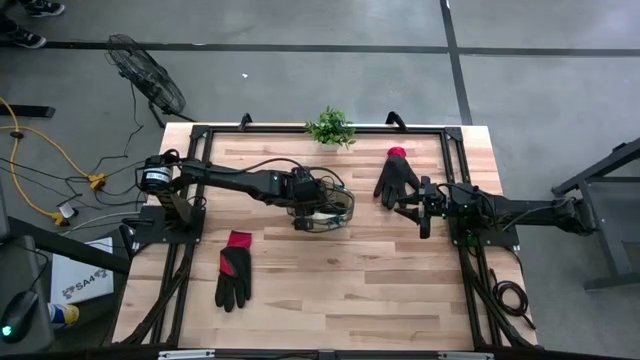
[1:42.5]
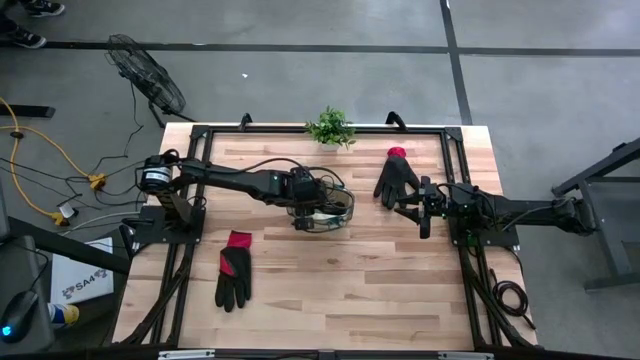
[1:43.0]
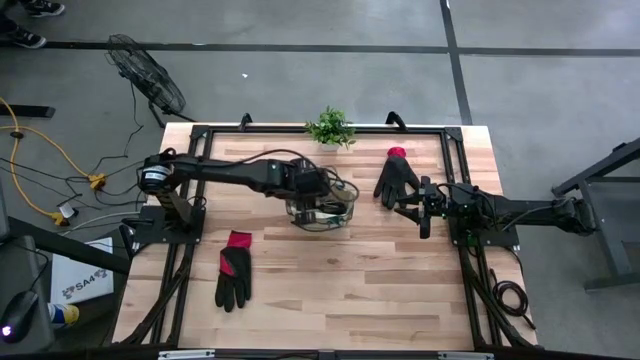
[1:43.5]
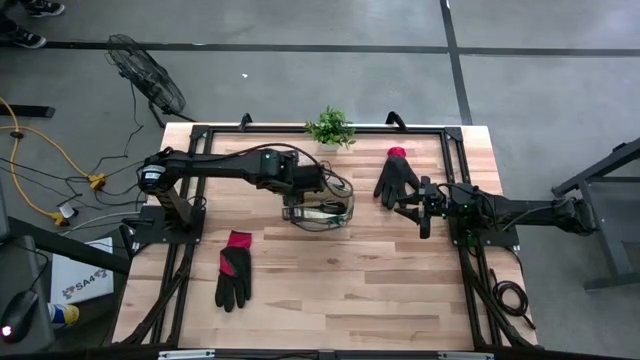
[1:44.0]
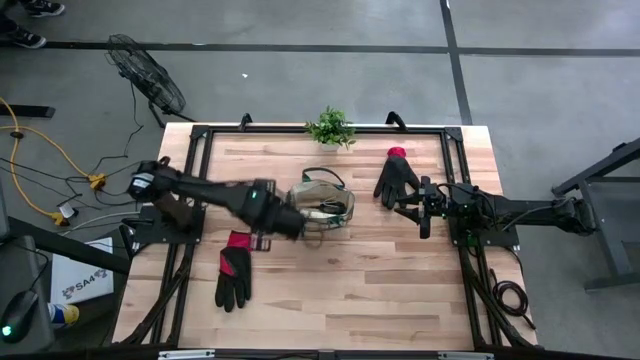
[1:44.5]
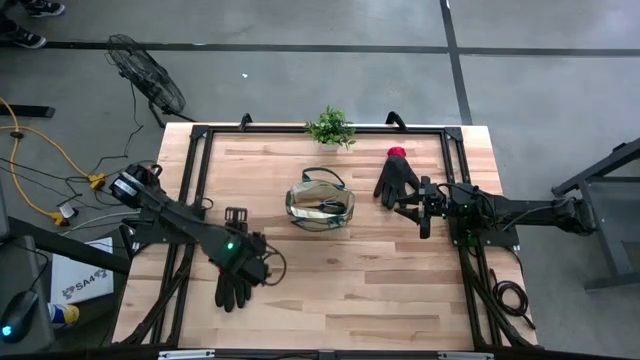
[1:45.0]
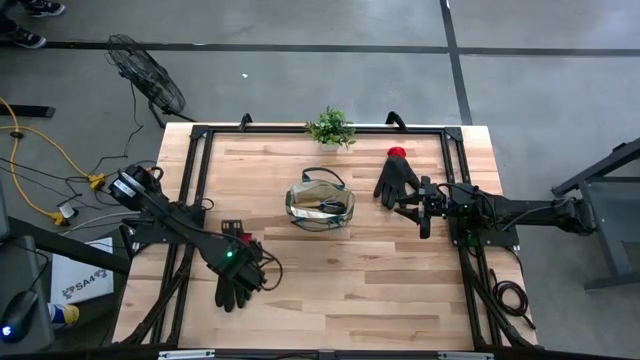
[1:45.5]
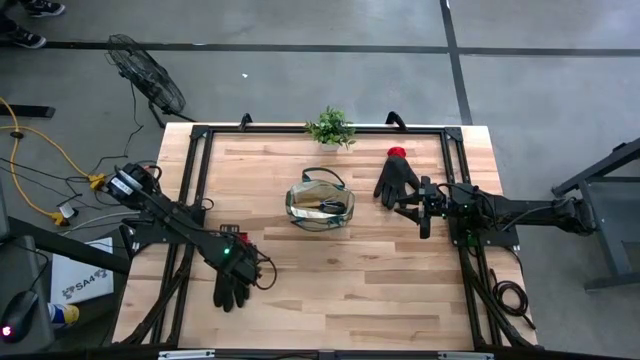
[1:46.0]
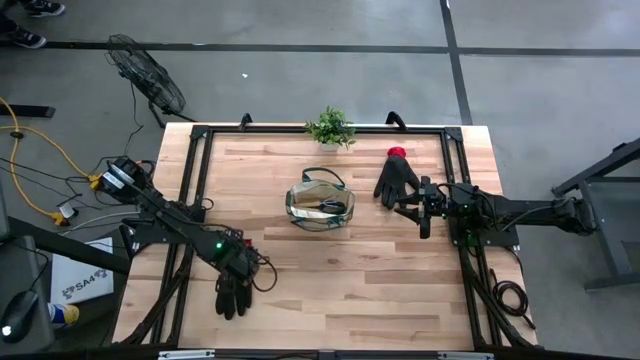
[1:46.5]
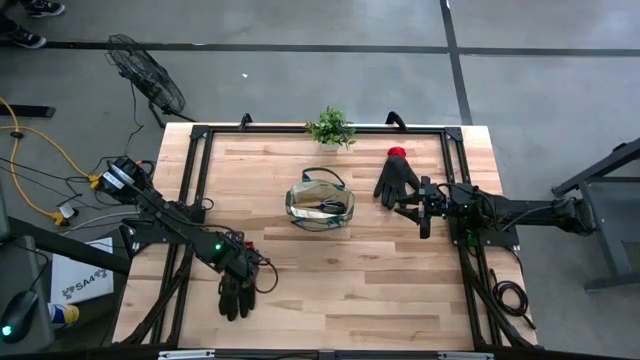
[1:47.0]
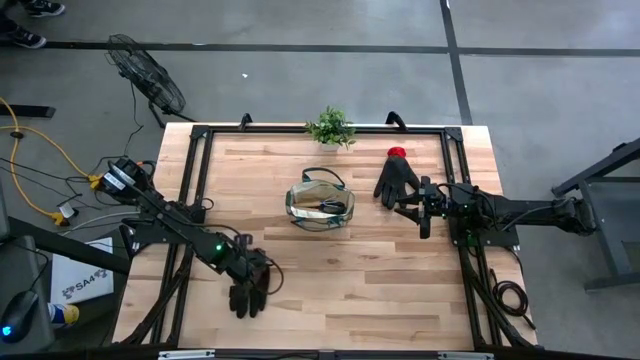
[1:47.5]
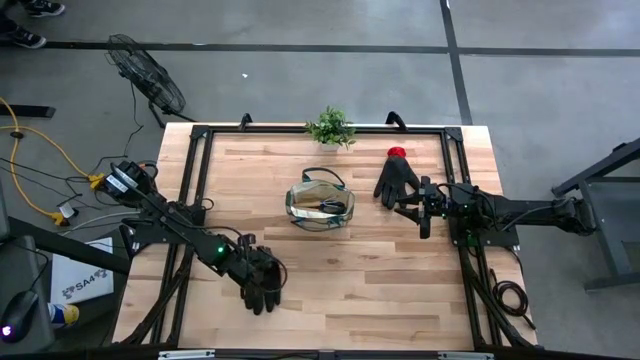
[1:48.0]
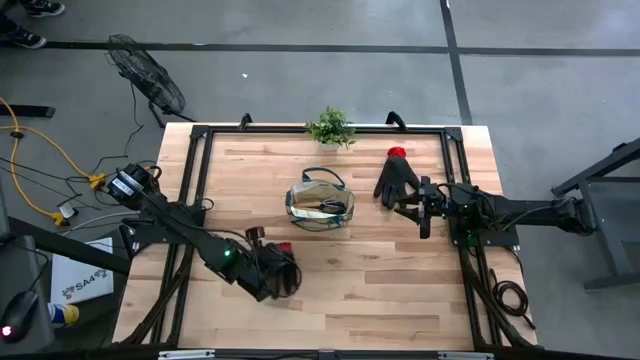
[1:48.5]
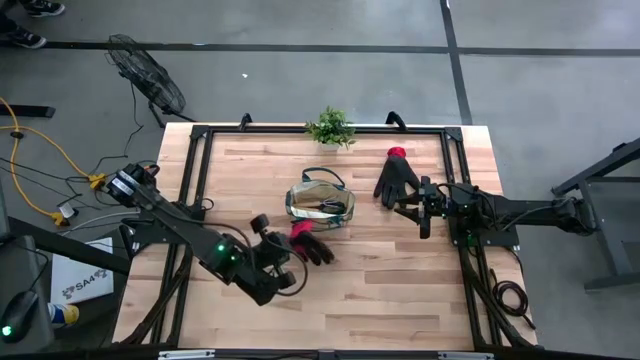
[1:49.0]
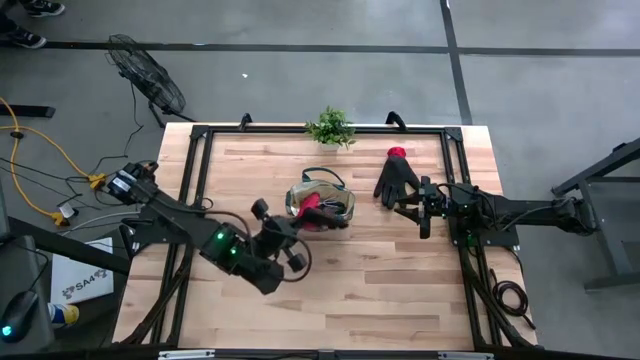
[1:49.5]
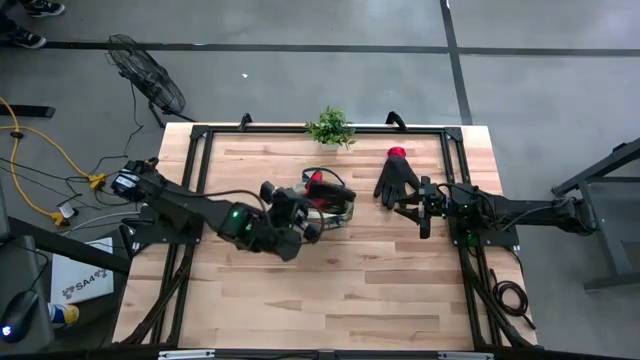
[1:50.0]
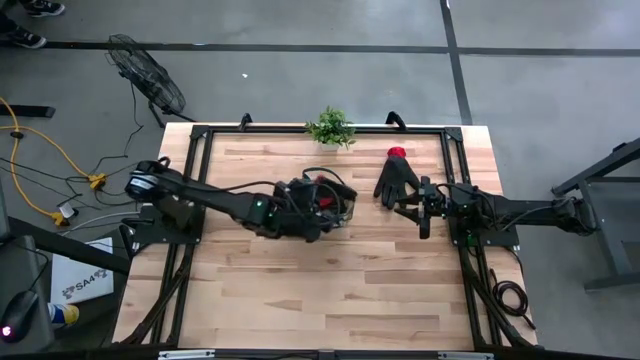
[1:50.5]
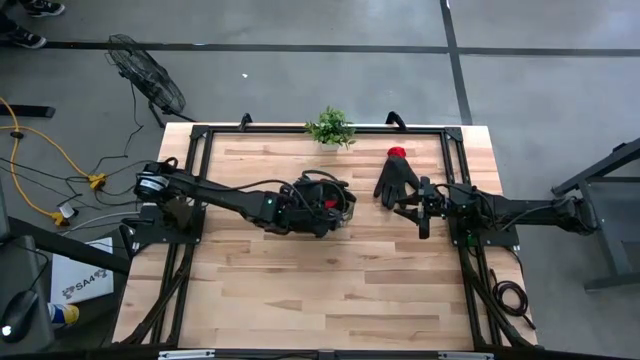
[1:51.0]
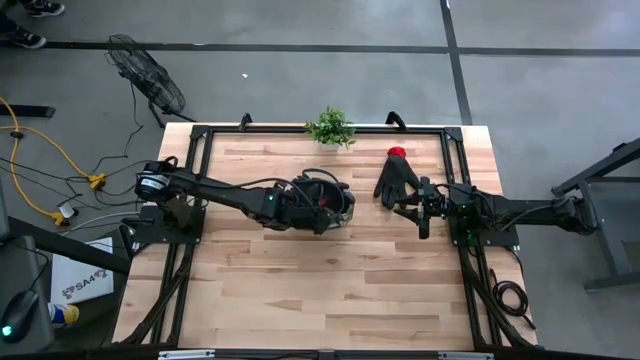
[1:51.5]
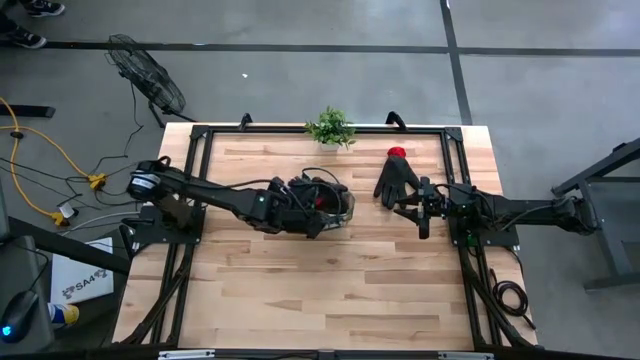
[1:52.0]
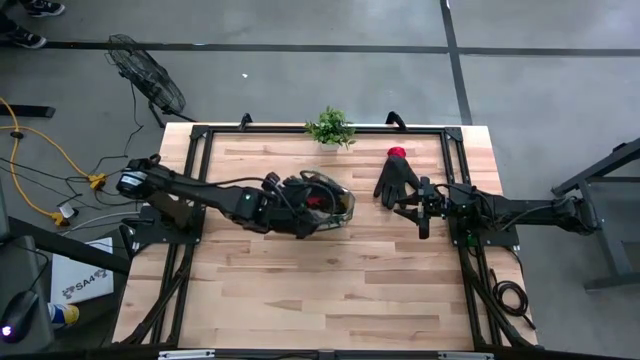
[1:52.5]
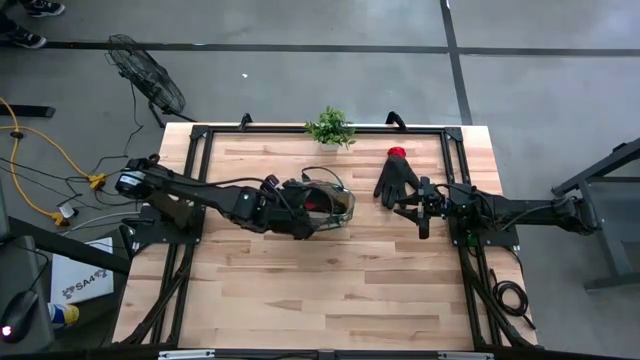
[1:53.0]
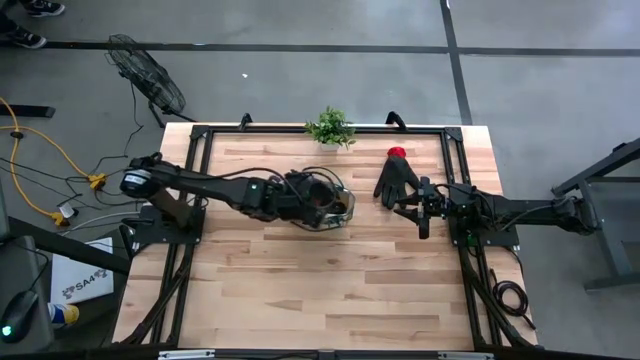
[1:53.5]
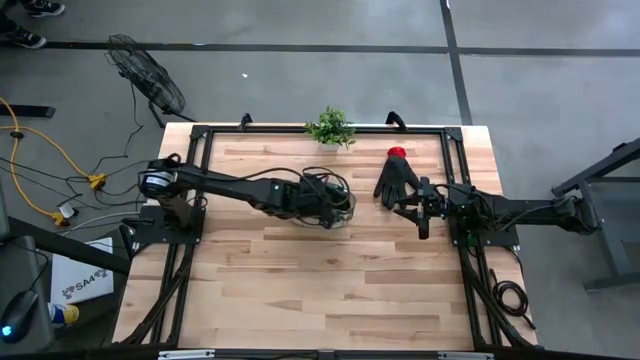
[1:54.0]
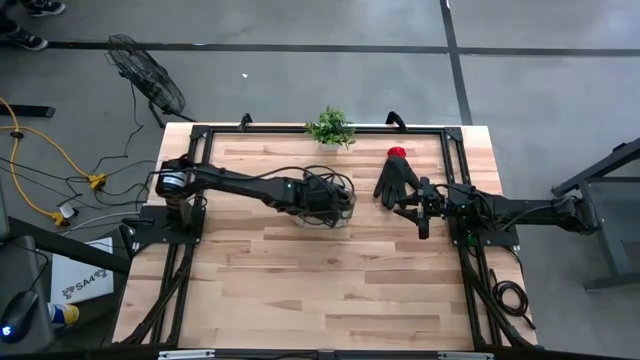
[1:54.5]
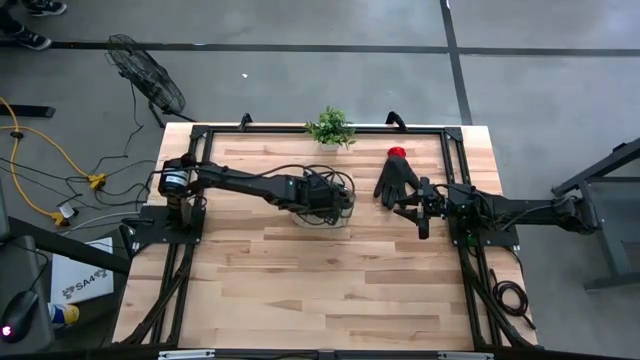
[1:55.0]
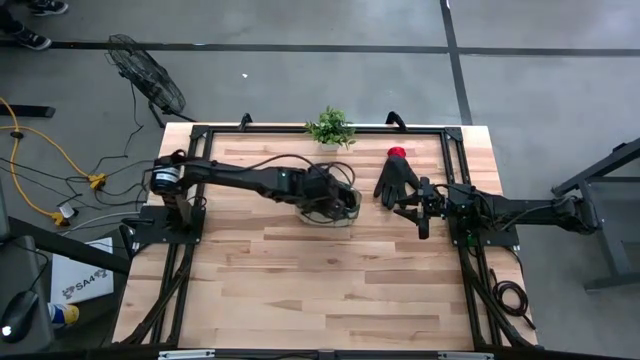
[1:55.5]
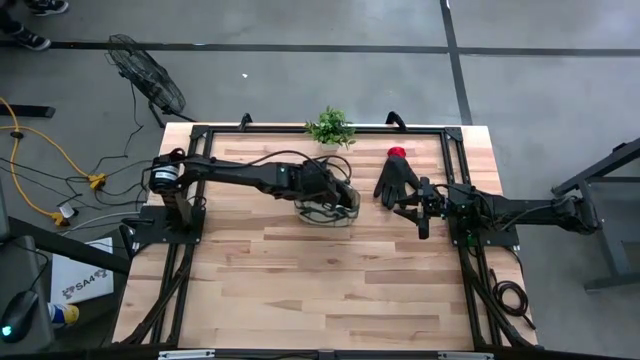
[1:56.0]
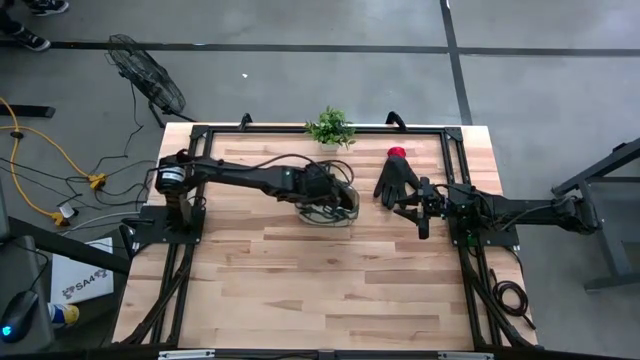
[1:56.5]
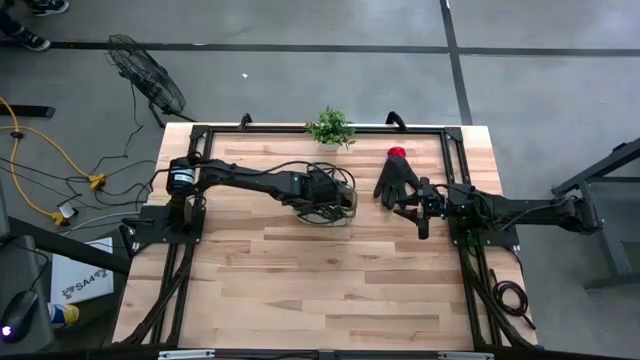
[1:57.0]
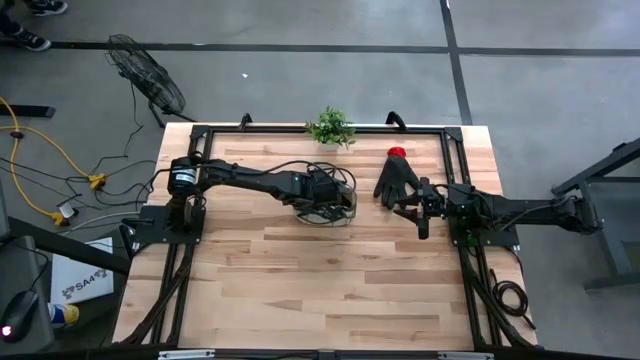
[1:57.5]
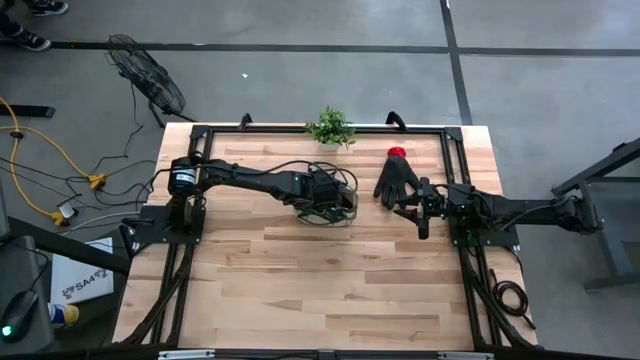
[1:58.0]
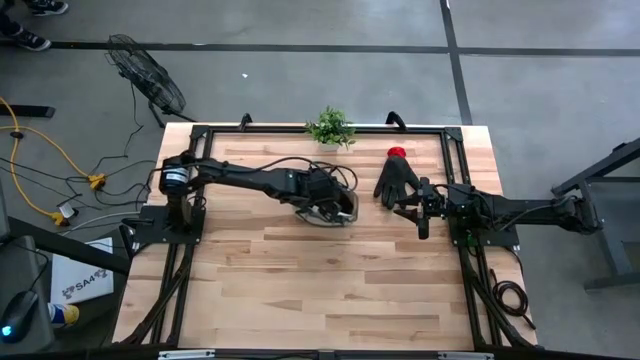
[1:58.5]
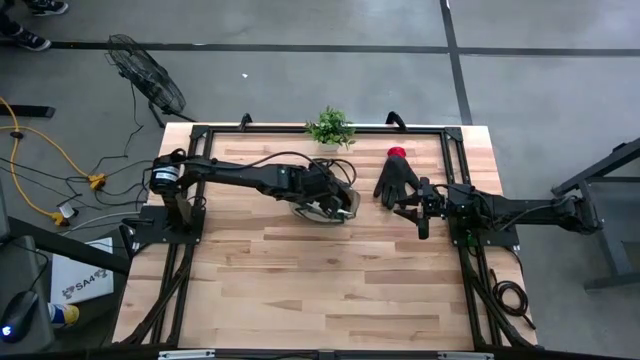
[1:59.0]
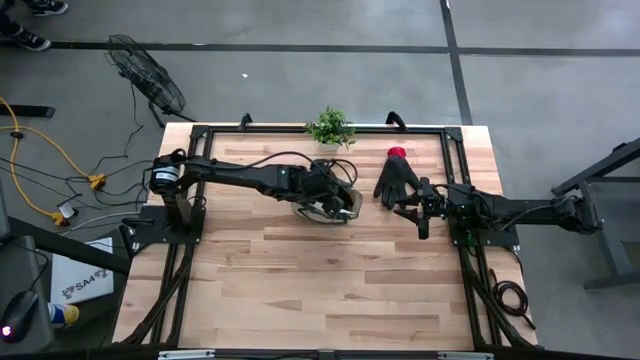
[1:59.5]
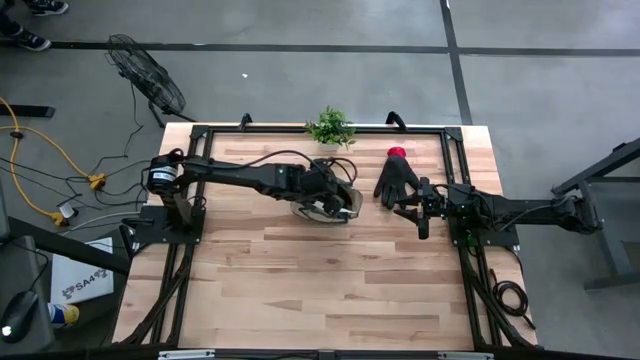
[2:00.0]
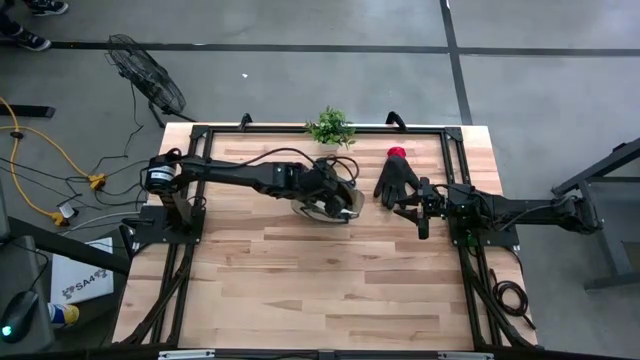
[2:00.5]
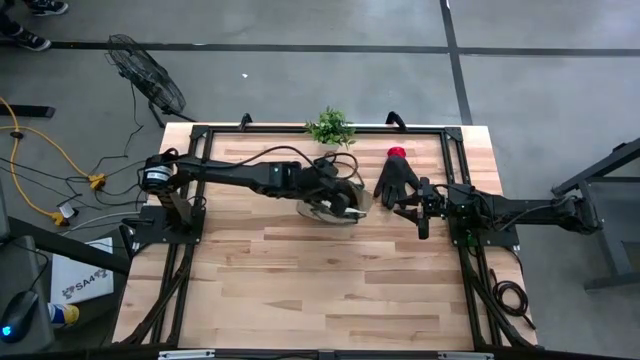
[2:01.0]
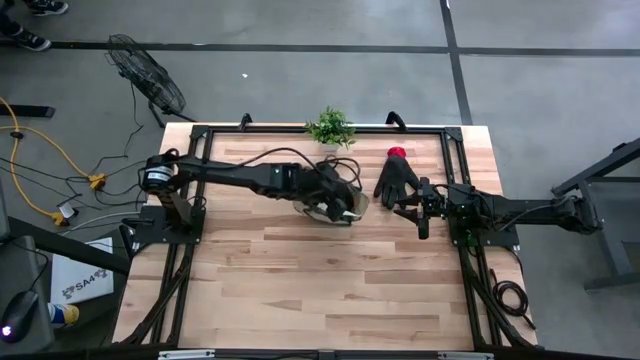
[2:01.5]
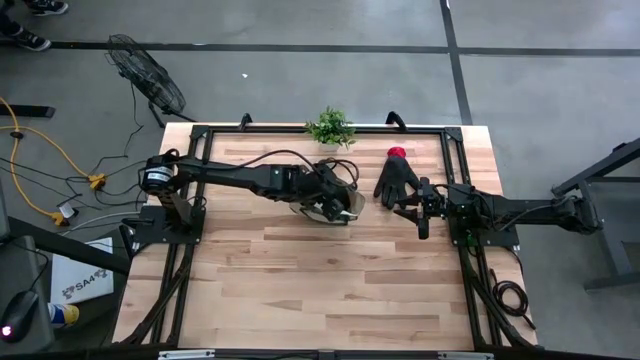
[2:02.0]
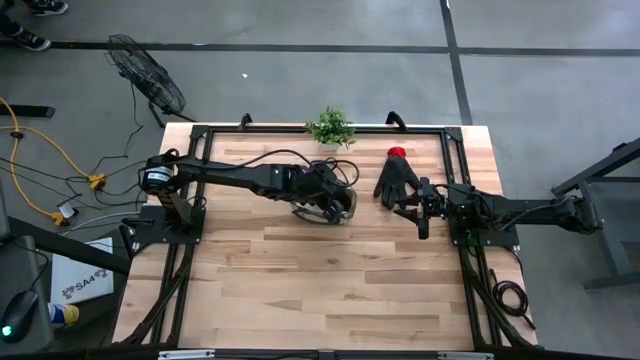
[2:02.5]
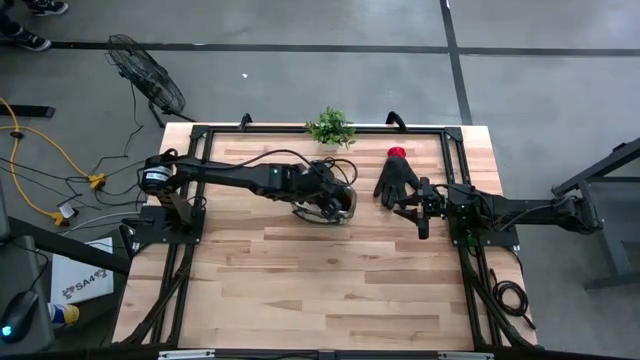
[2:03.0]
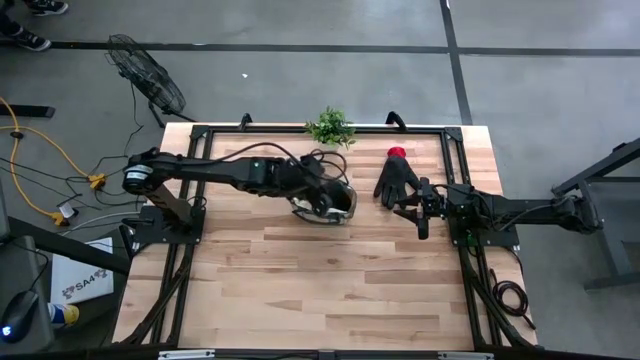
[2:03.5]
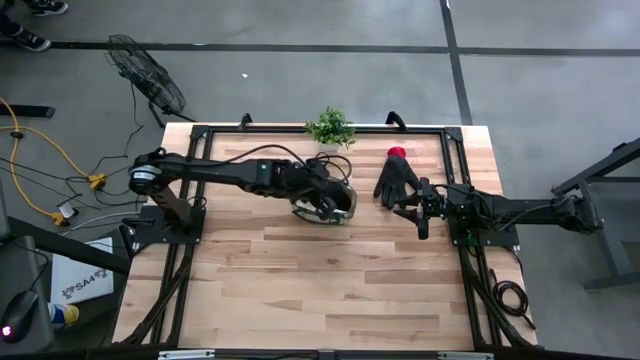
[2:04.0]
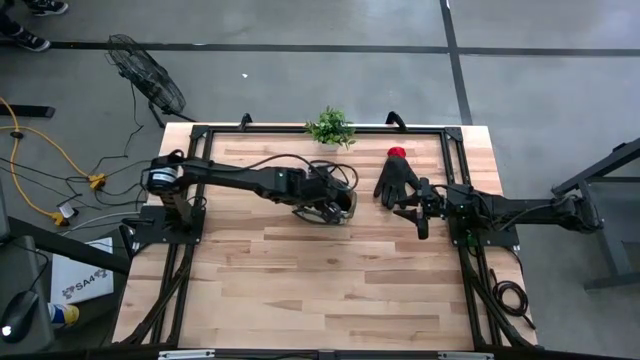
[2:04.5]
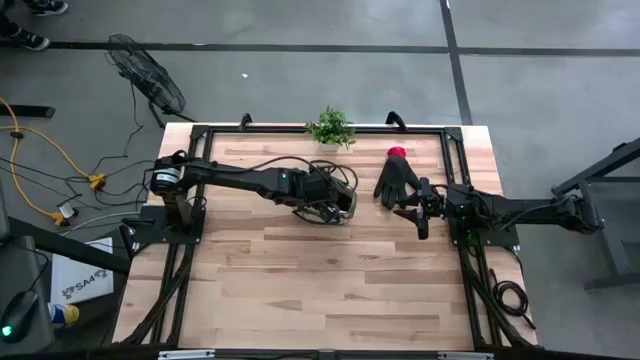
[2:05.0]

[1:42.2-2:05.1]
Task: Pick & Place Garden tools in Gardening bag
Put the red glove into the gardening bag
